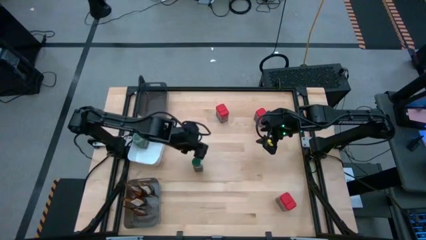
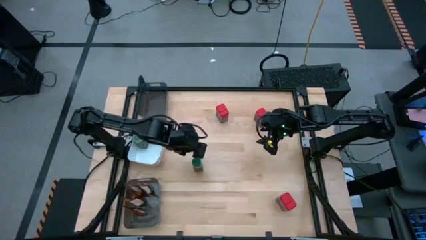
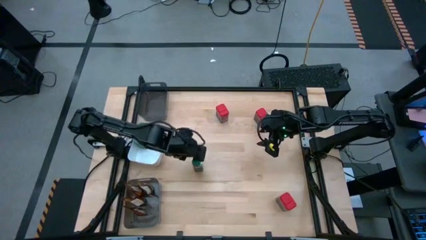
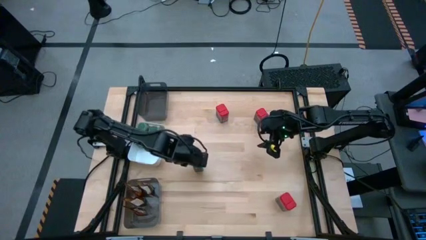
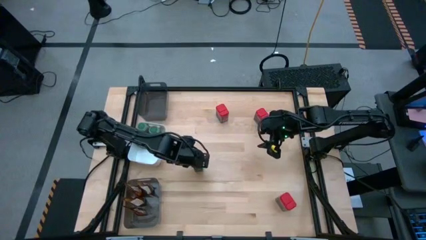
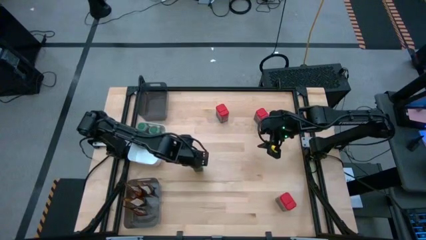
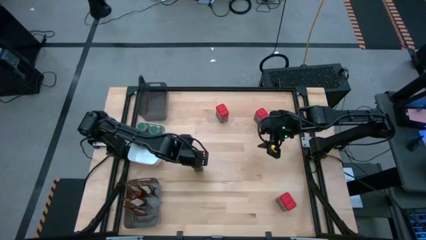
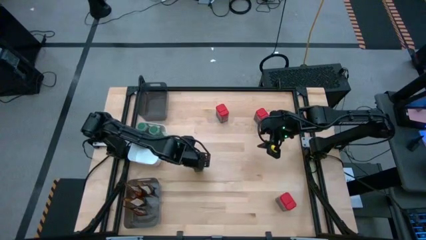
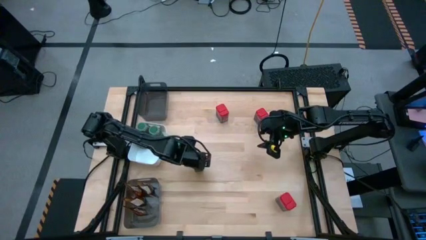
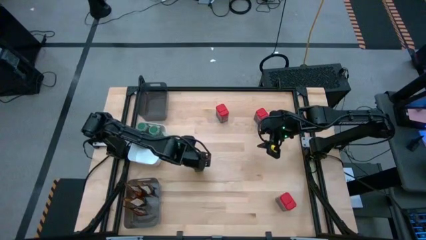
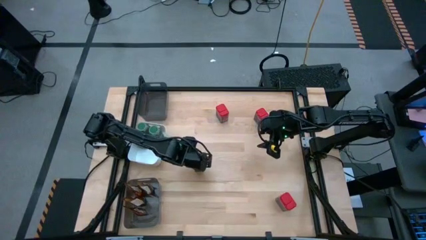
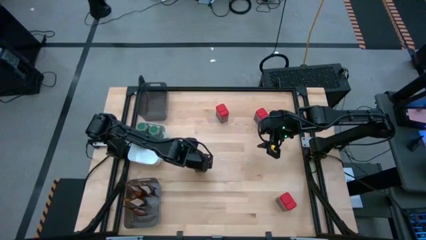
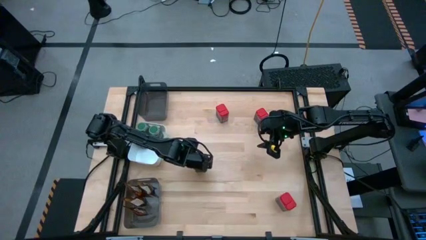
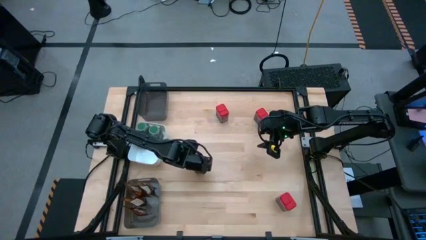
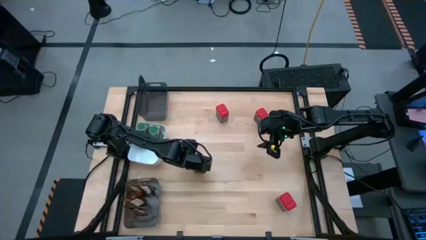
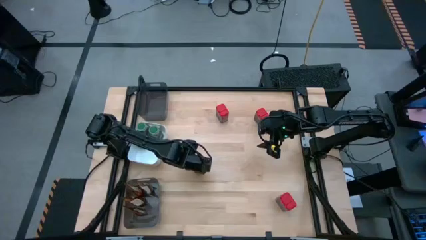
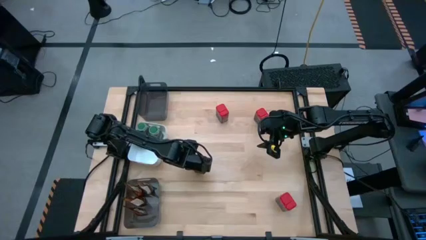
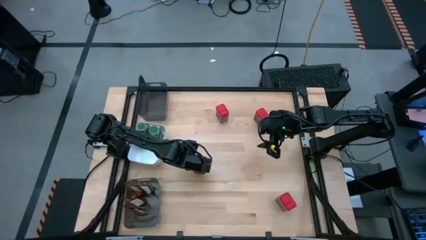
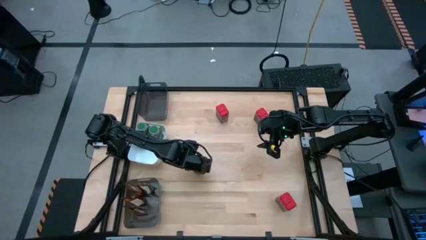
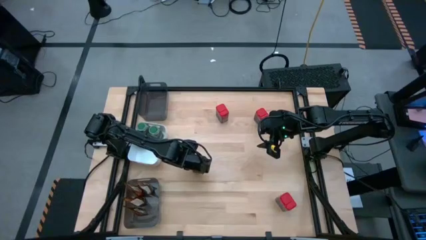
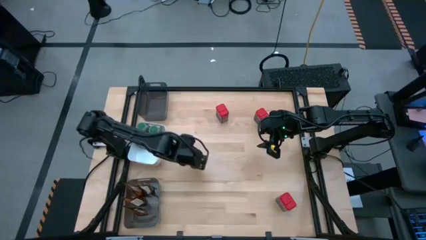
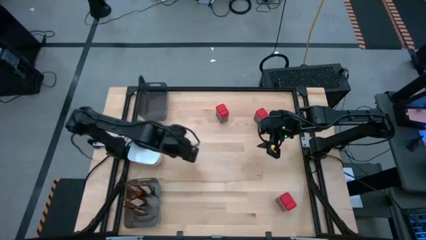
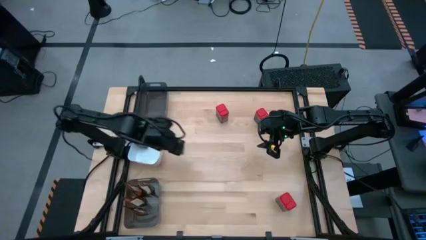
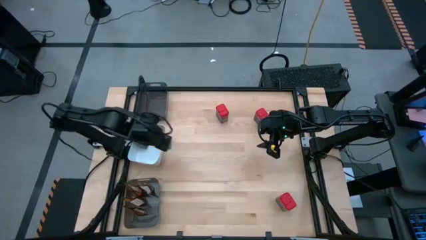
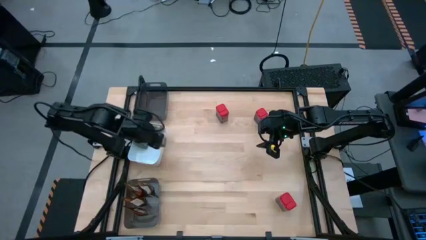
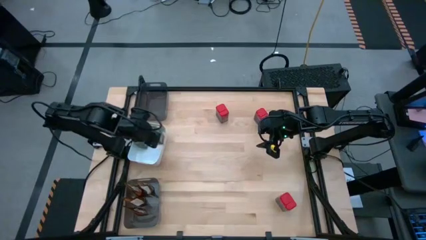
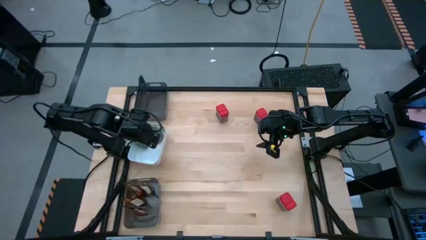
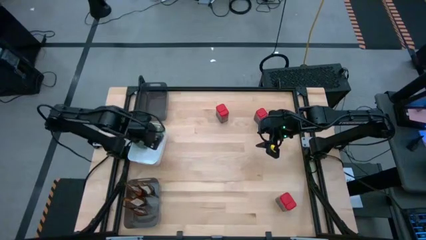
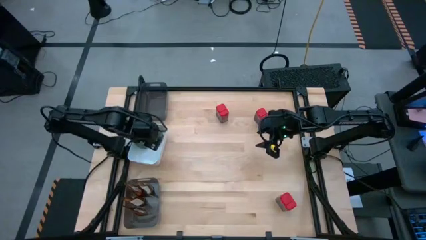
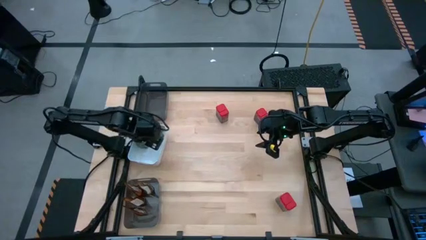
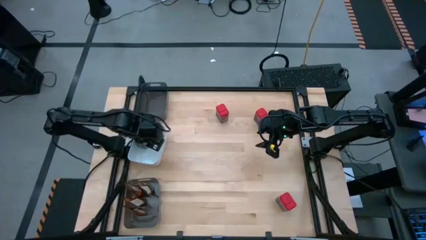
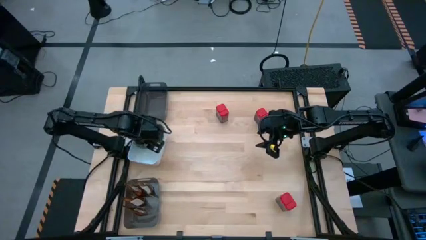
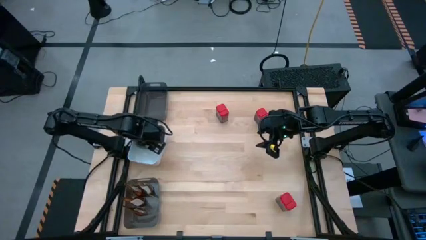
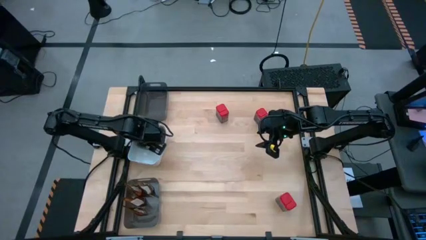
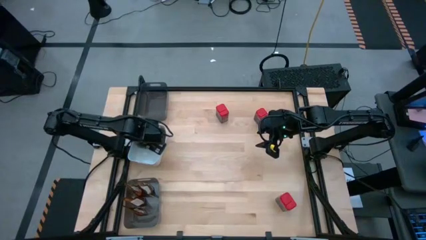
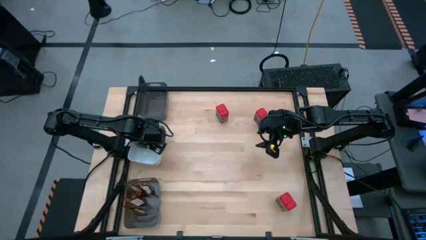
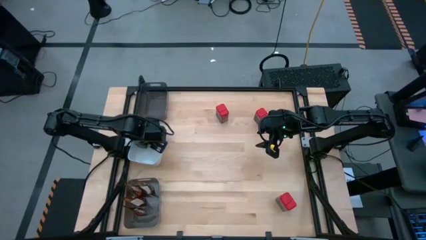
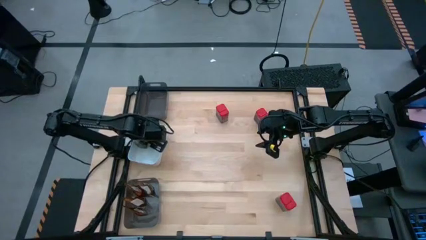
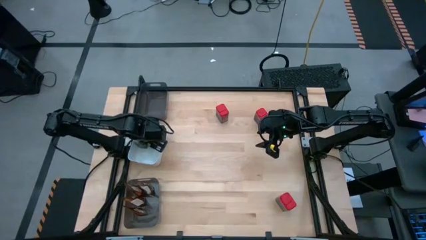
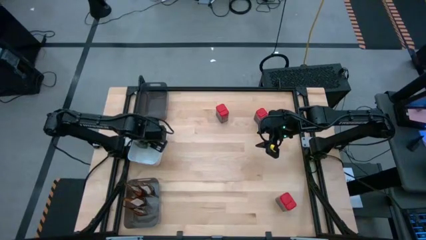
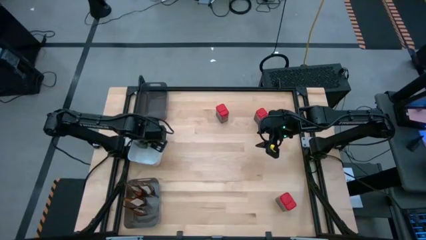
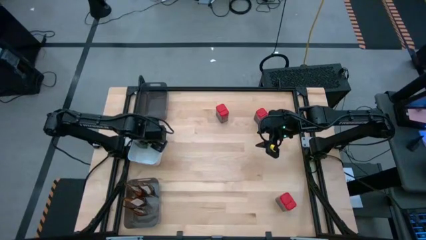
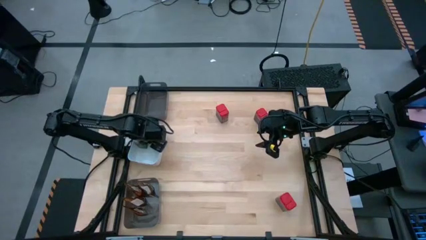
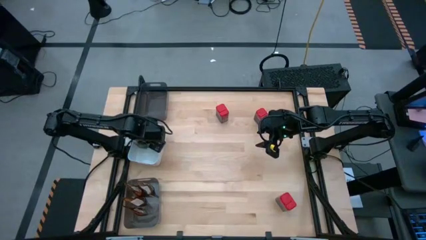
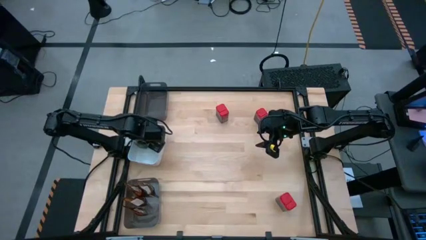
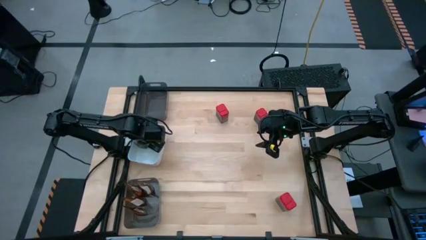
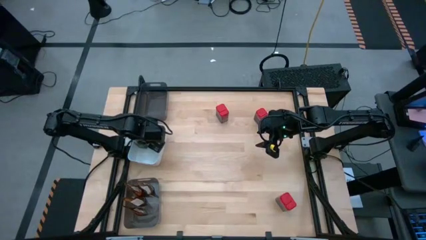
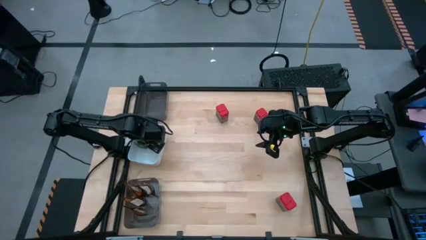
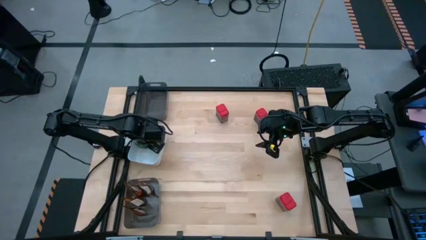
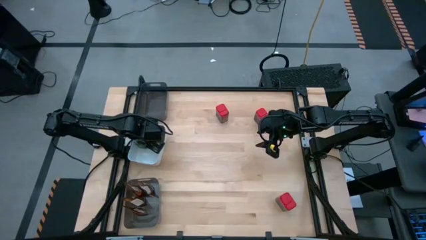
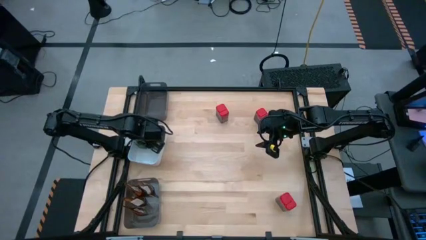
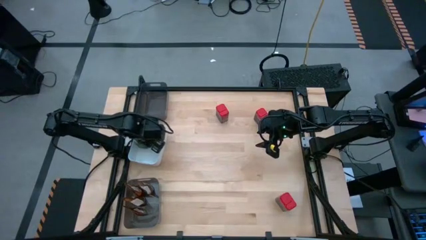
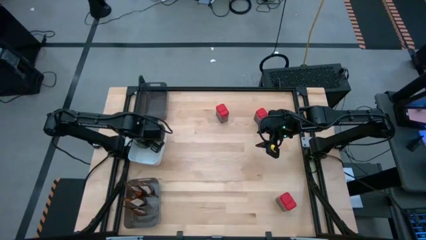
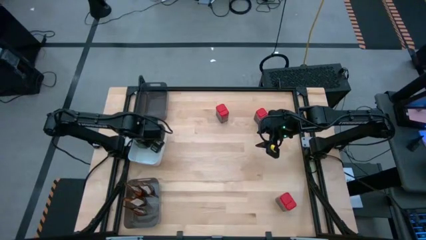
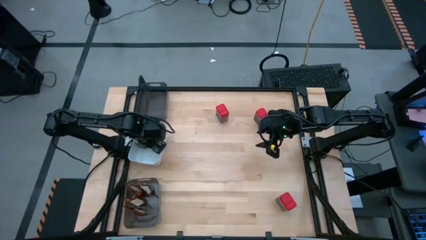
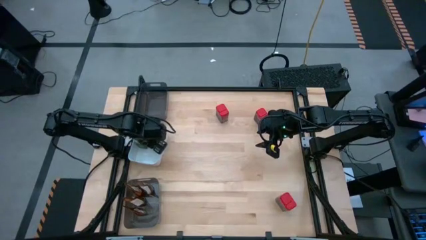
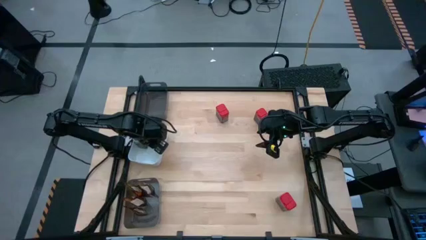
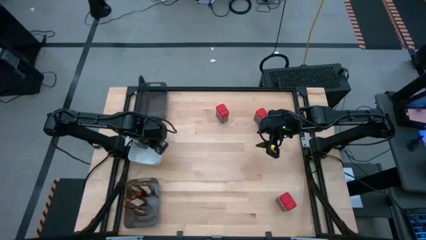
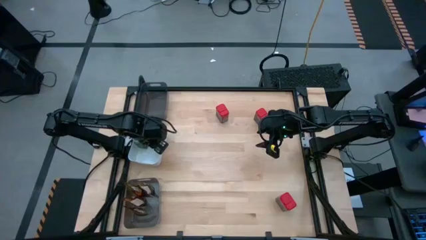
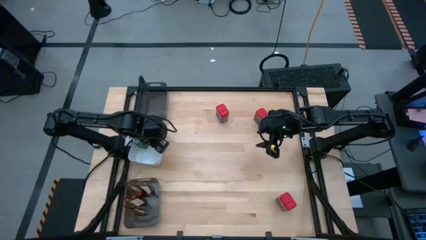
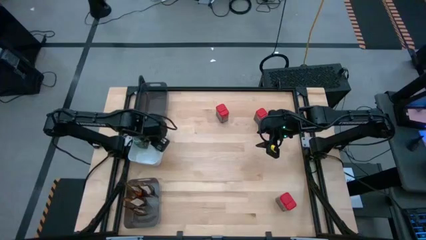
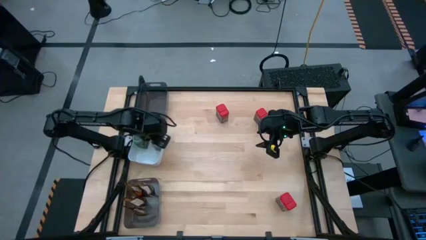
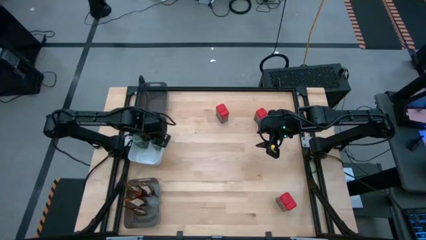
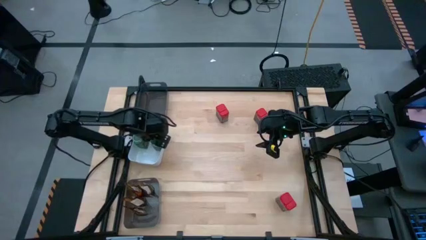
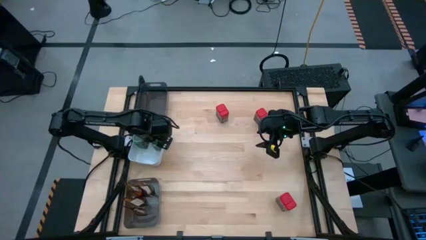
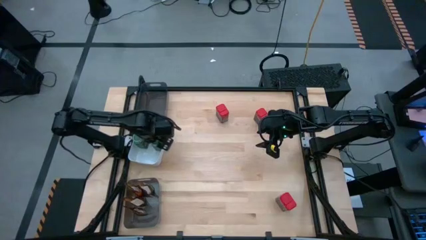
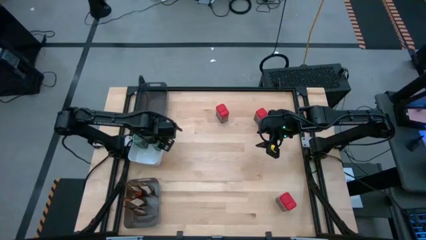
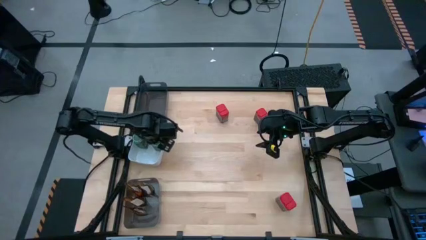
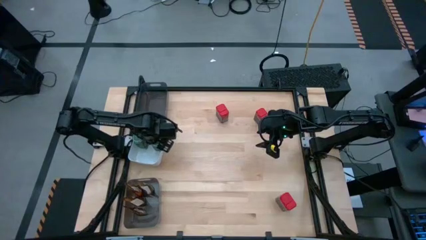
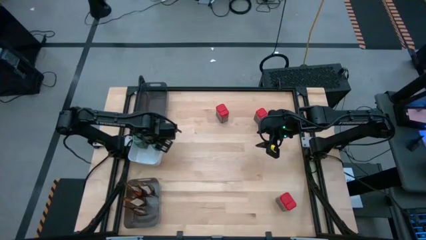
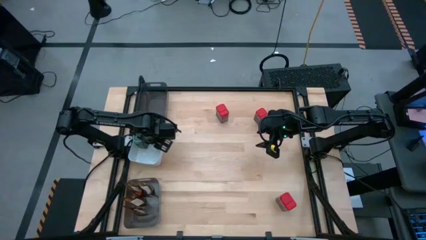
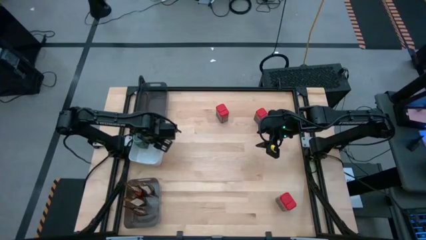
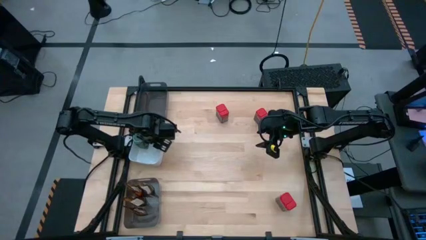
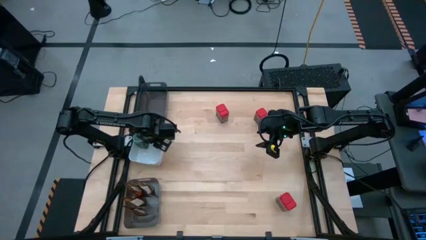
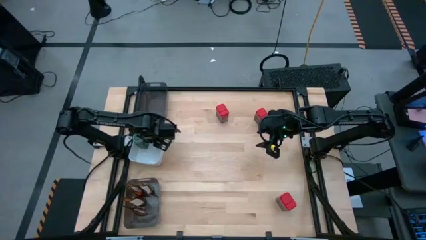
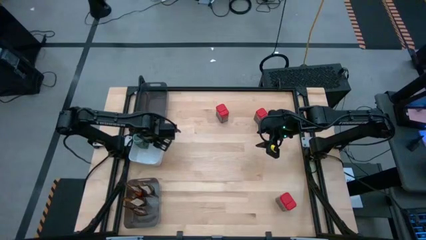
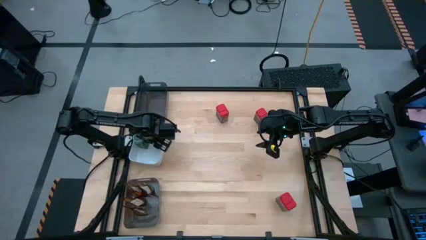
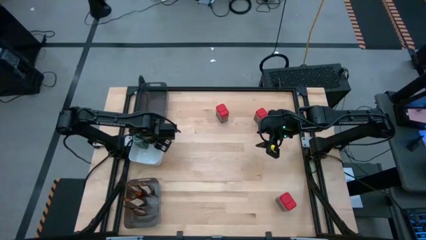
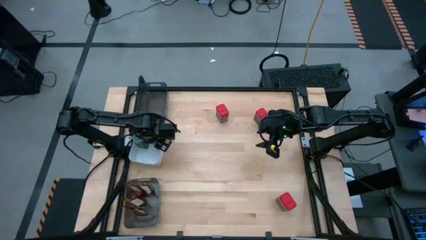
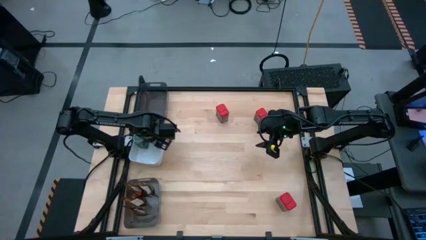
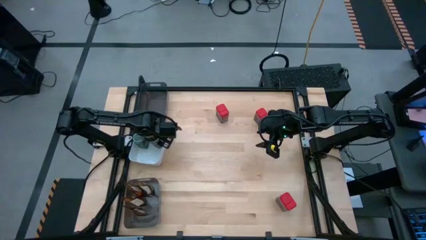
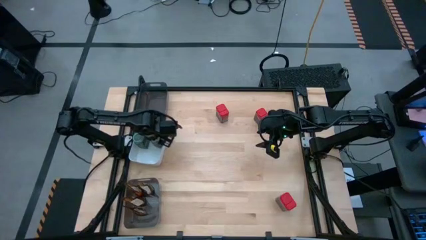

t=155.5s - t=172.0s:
Task: Sort spices by type
Put the green bottle seasoning into the white bin

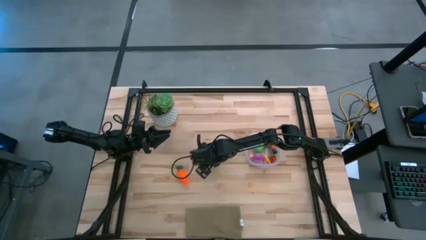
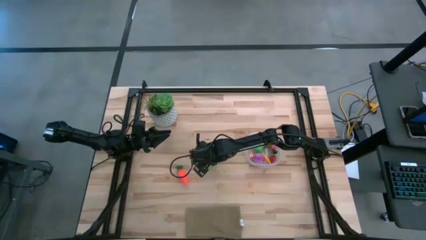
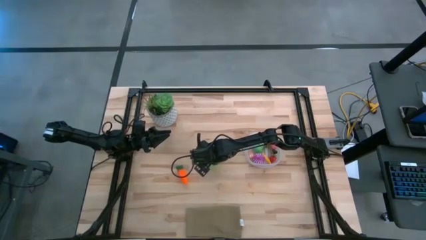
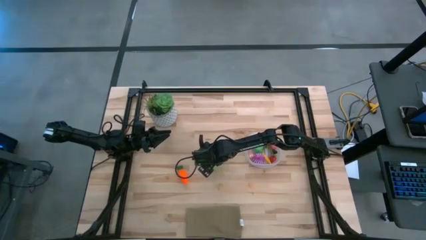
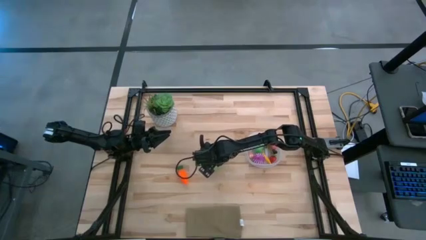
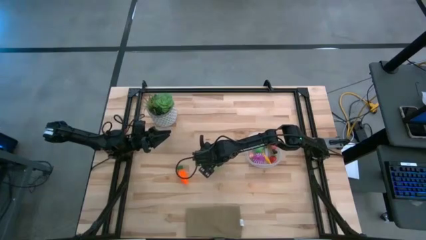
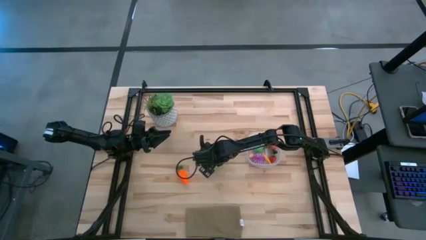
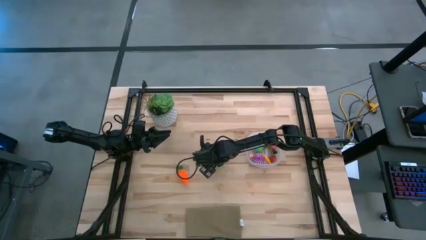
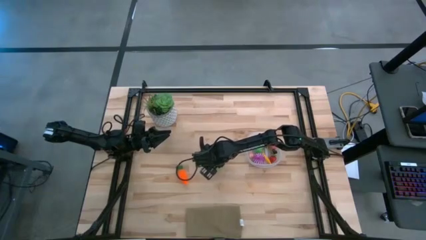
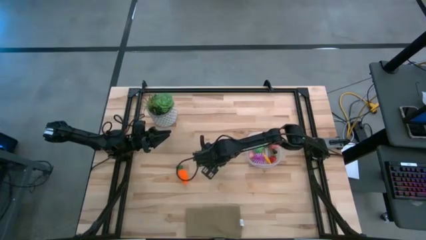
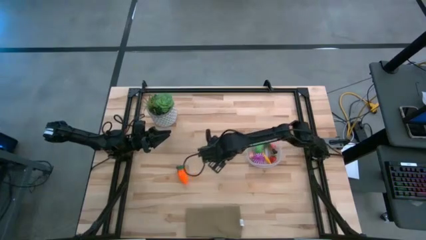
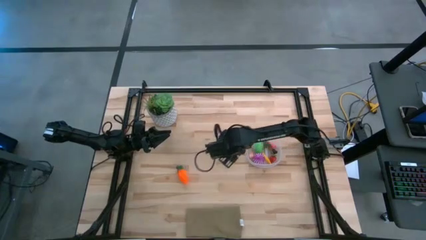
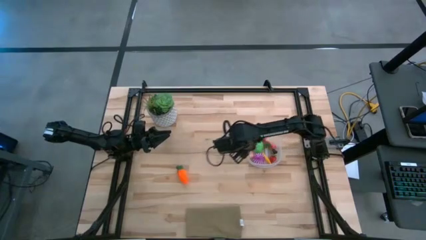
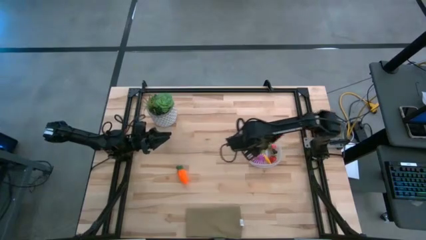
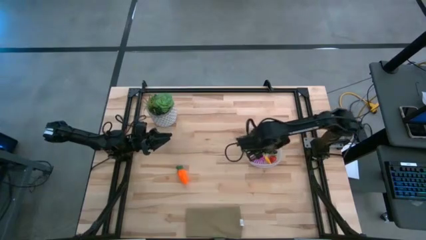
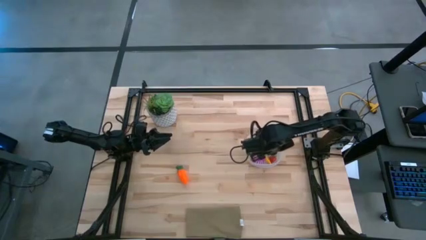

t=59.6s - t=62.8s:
Task: Pick and placing Produce into tupperware
Put the green cabbage into the transparent container
